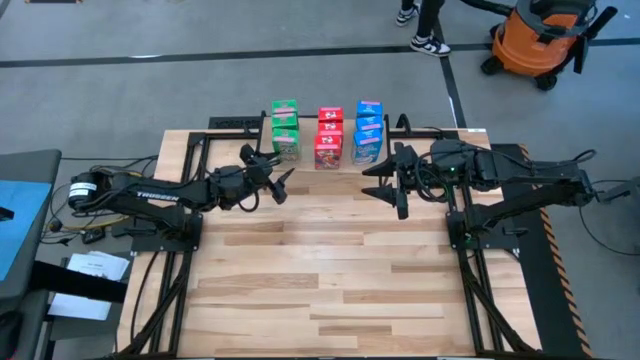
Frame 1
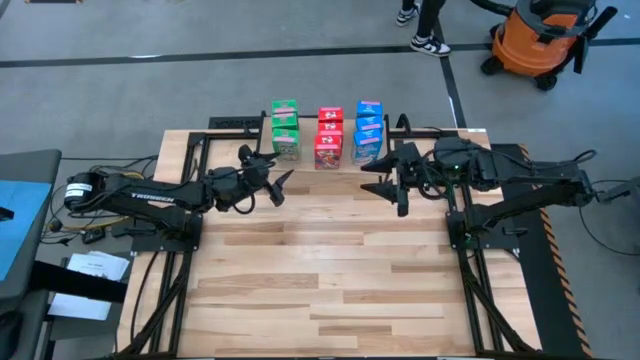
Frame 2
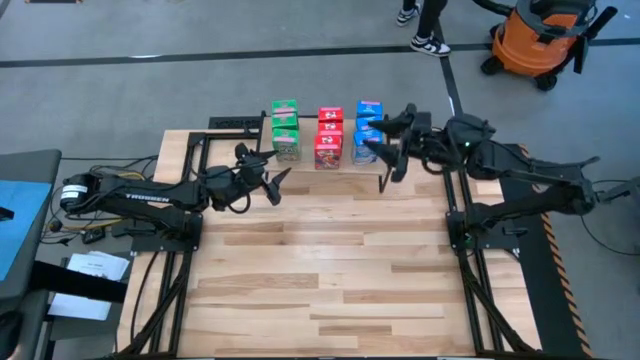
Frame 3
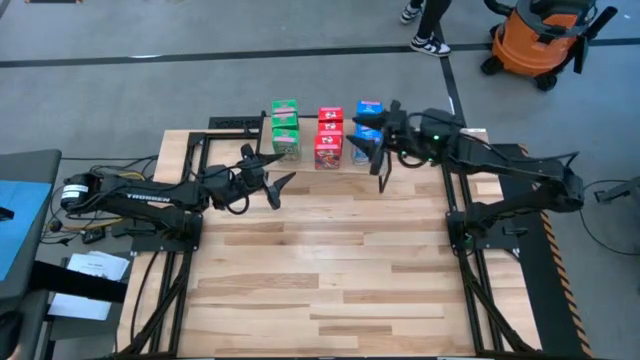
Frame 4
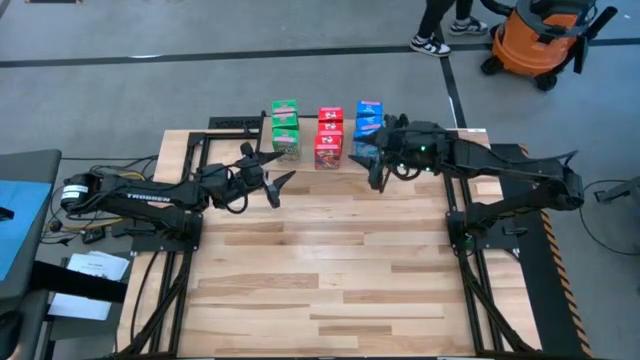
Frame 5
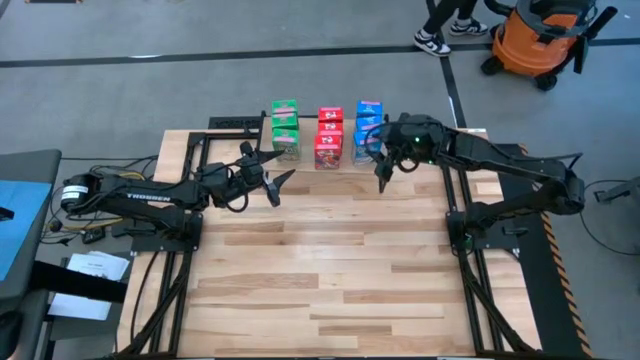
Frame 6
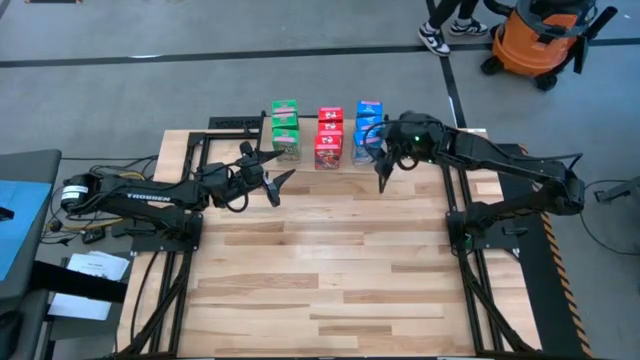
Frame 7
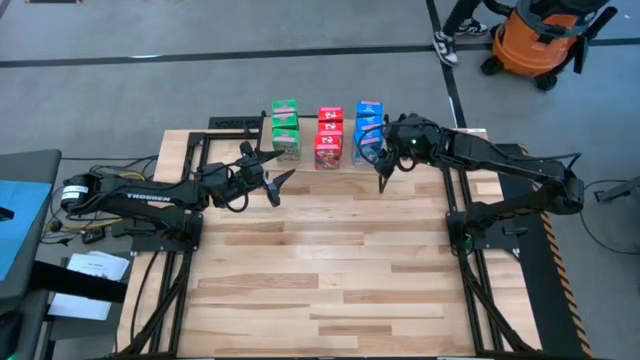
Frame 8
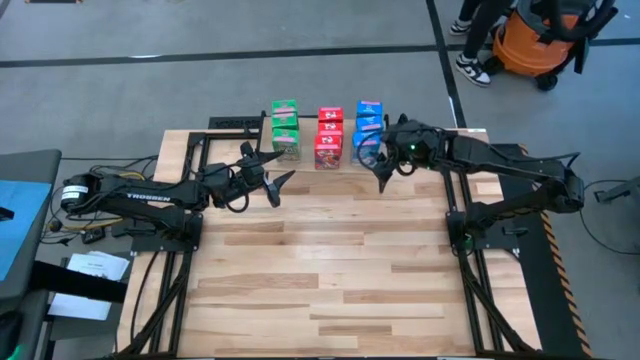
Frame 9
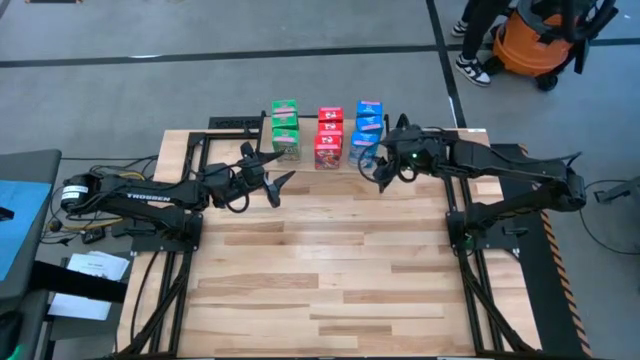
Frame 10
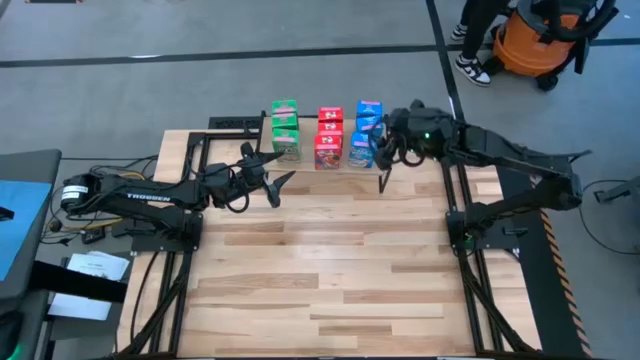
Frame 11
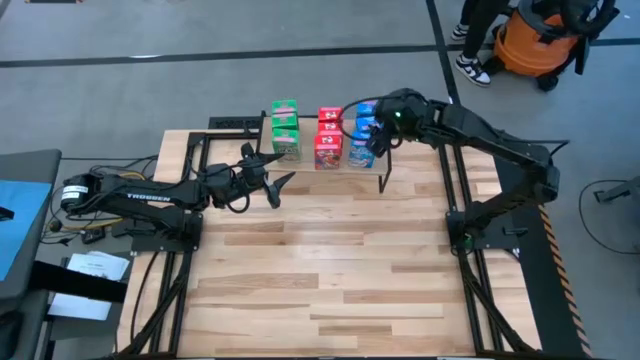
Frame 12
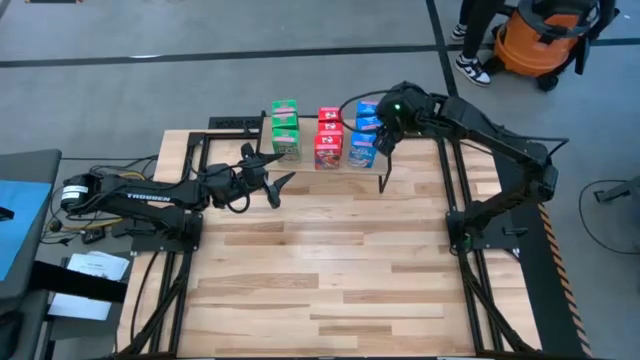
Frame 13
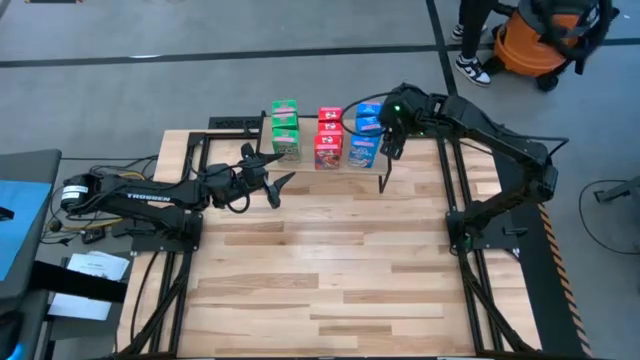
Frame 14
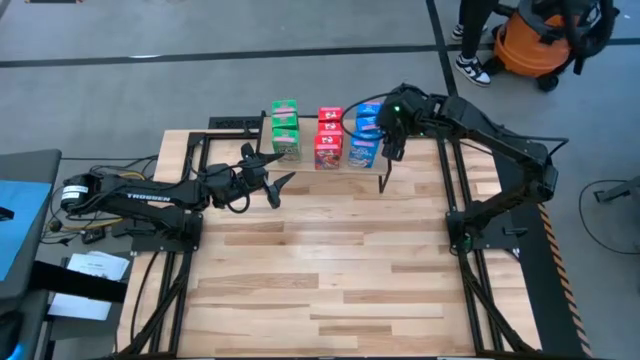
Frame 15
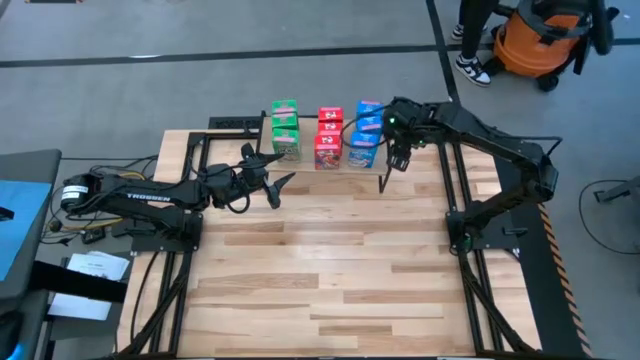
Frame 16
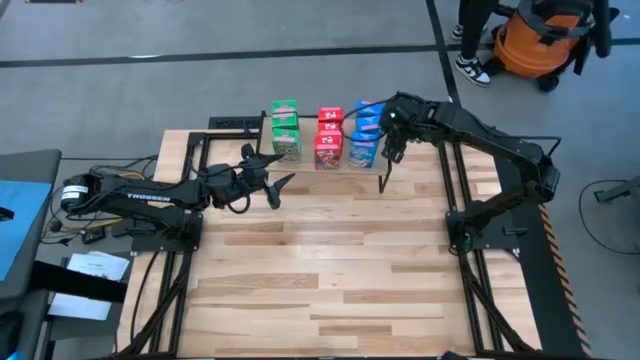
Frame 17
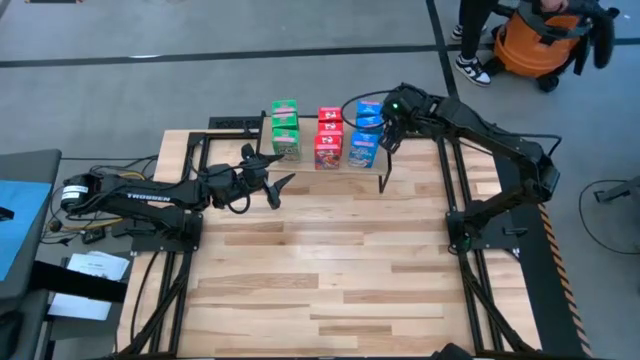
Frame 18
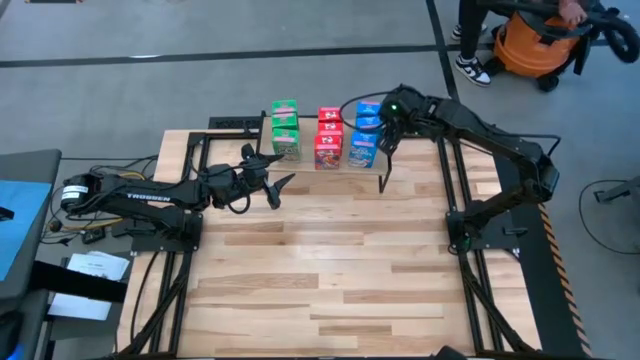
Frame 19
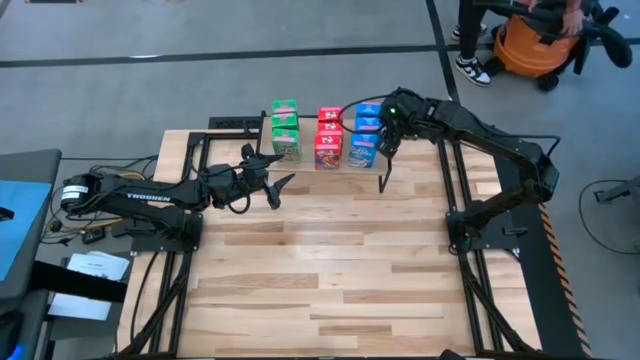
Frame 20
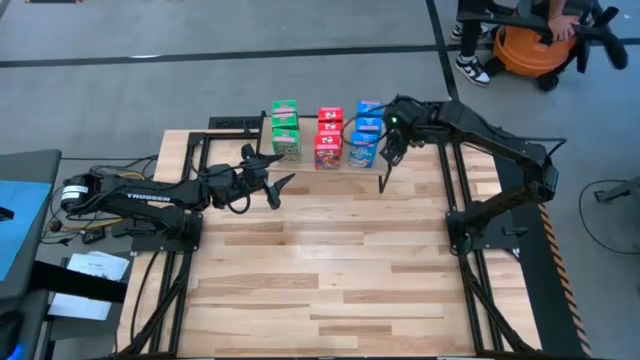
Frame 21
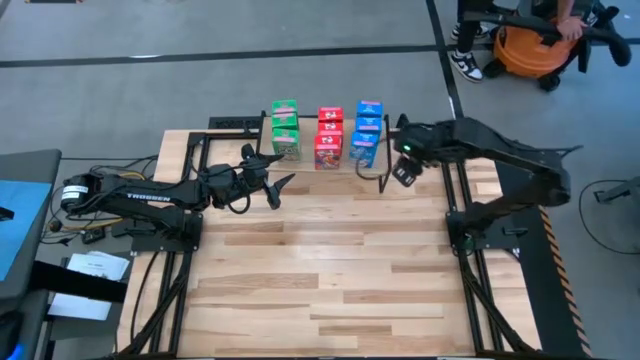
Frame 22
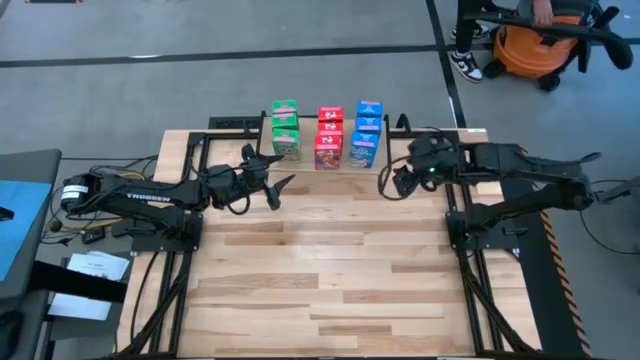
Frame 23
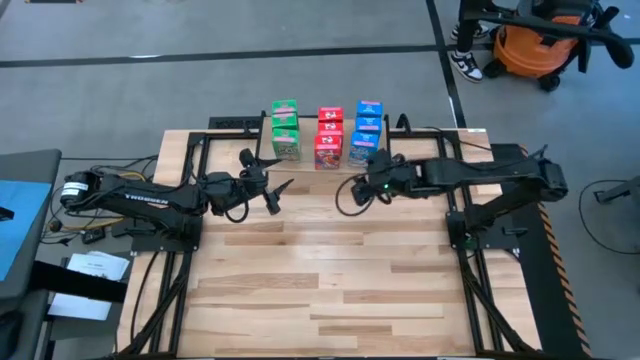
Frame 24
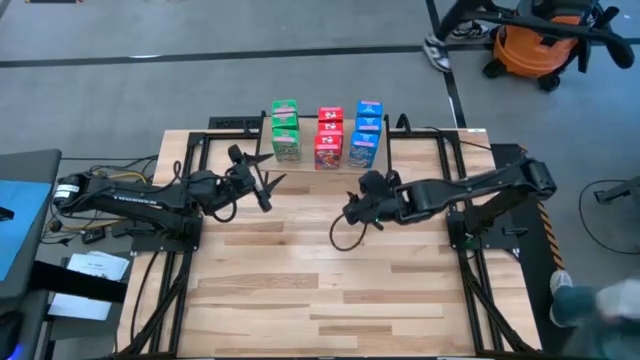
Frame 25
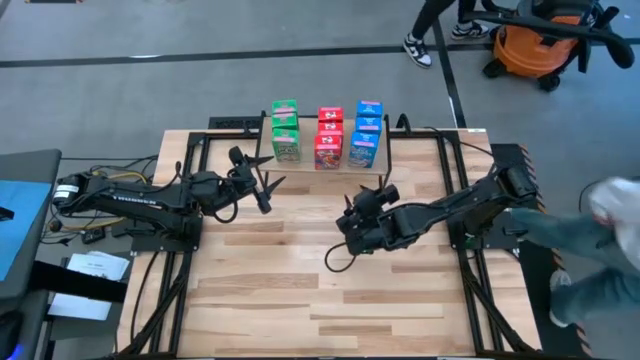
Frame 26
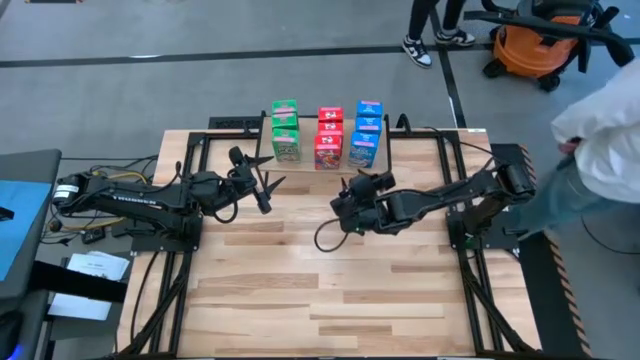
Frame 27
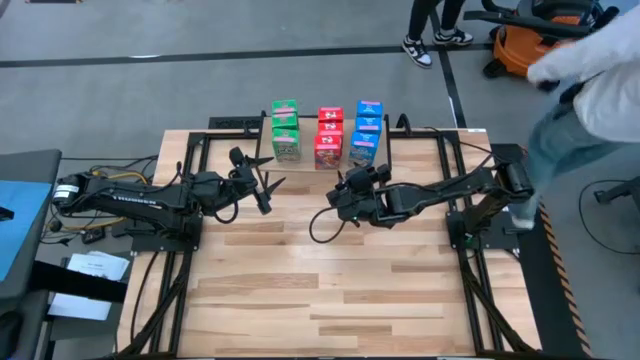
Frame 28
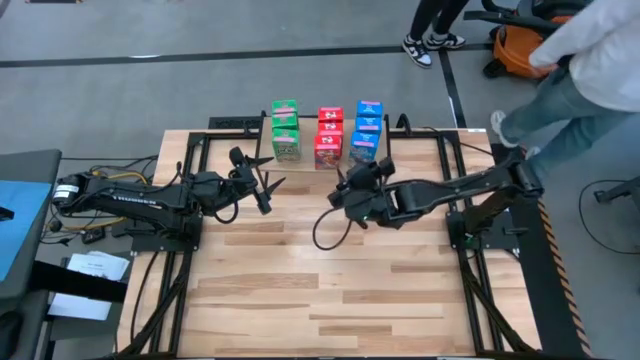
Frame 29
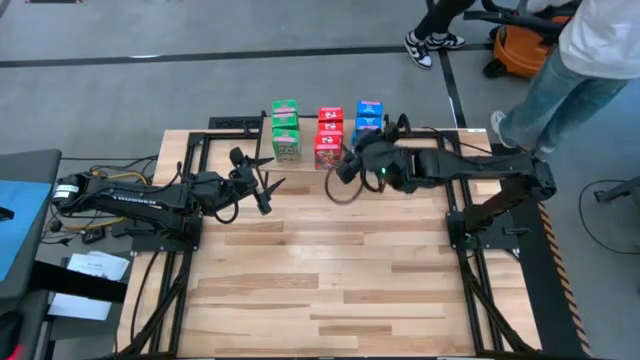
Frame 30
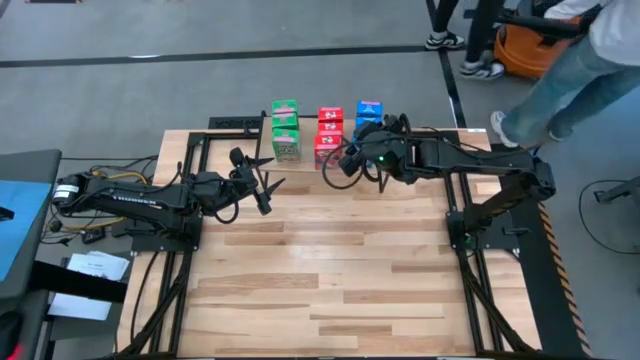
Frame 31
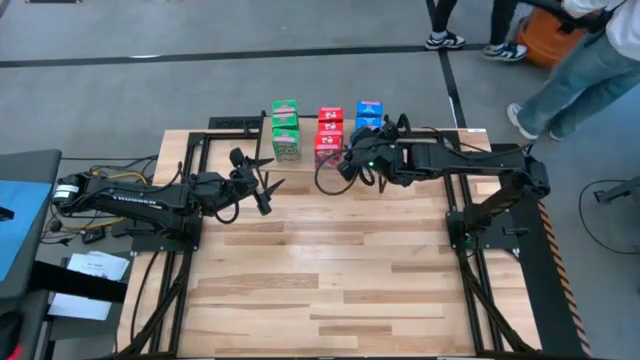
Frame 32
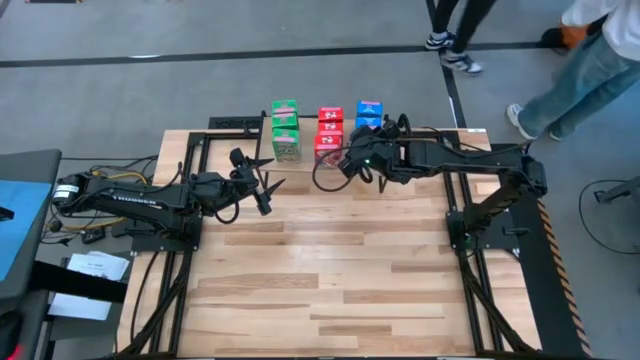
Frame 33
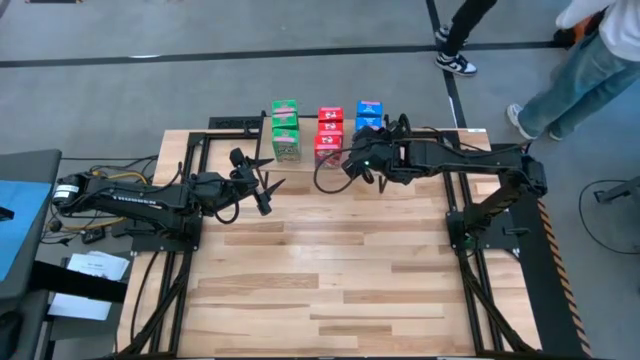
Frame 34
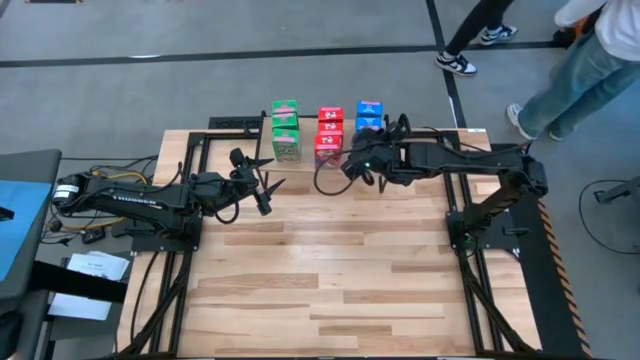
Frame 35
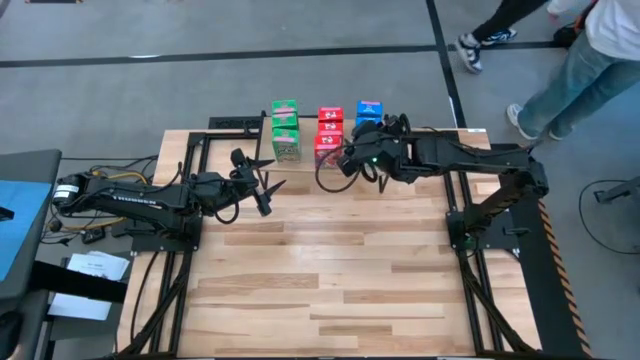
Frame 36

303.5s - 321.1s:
Task: Stack cereal on shelf
Adjust the blue cereal box on the shelf
